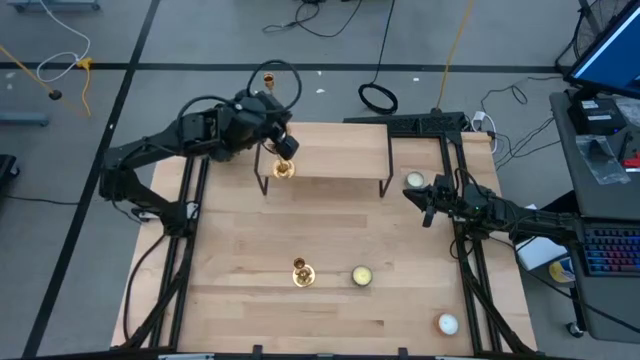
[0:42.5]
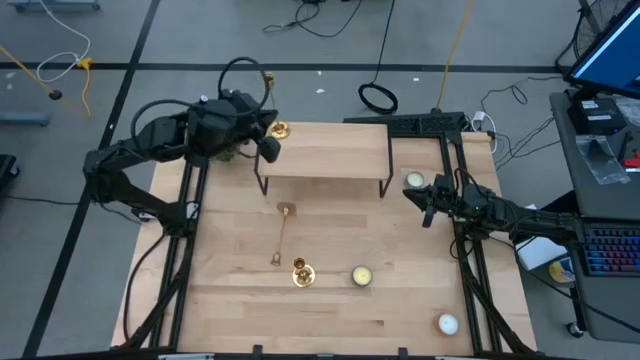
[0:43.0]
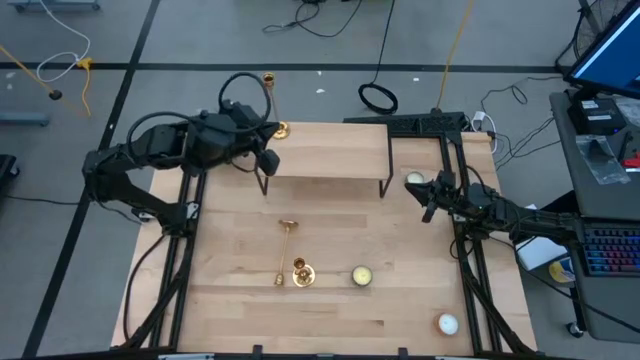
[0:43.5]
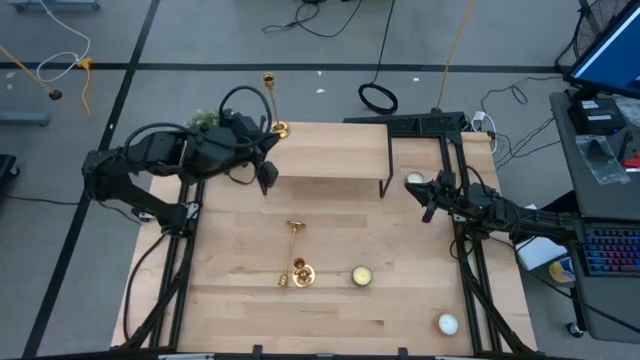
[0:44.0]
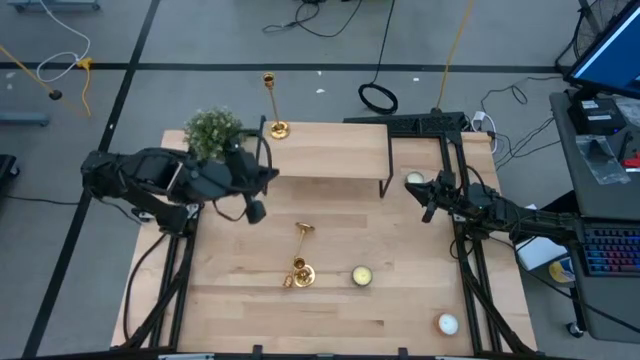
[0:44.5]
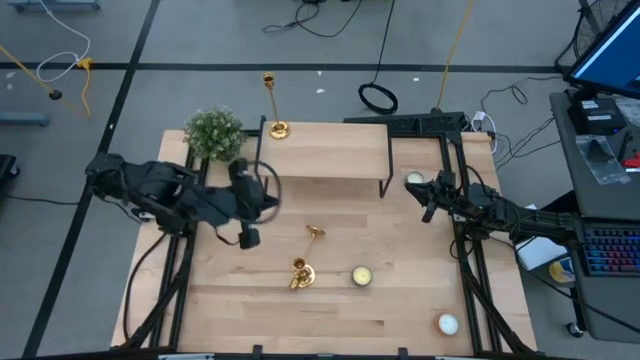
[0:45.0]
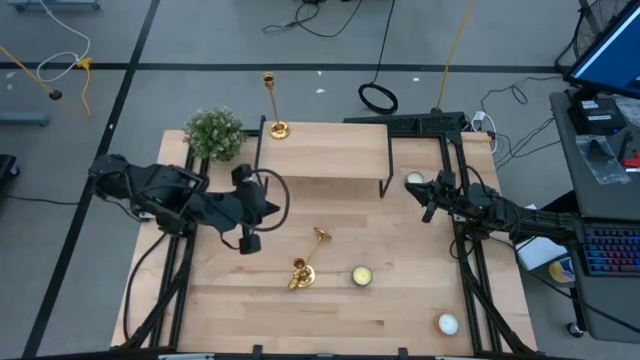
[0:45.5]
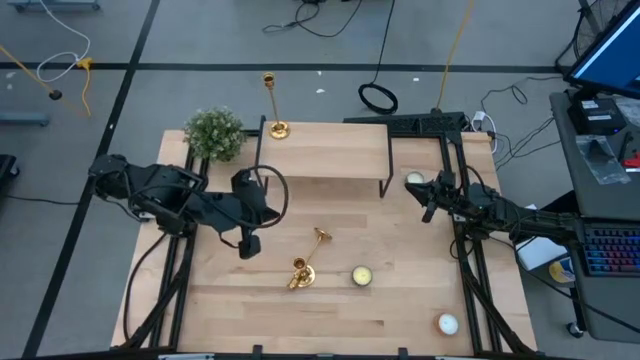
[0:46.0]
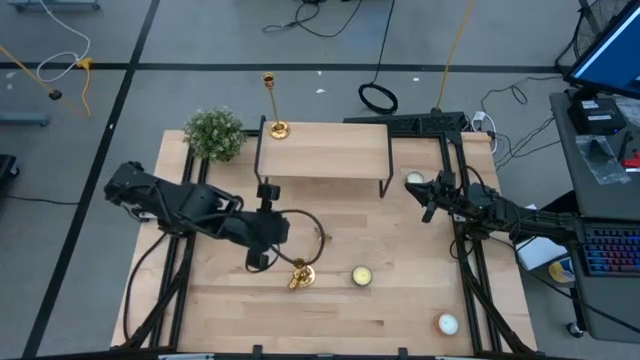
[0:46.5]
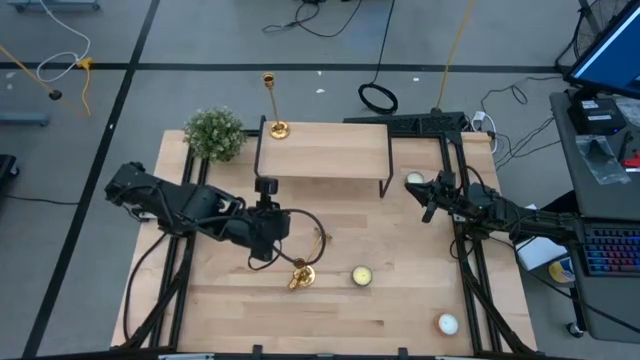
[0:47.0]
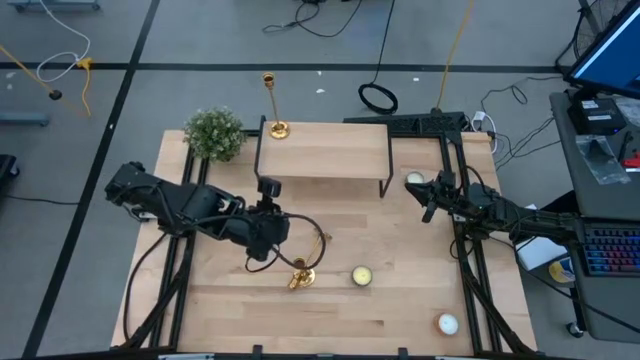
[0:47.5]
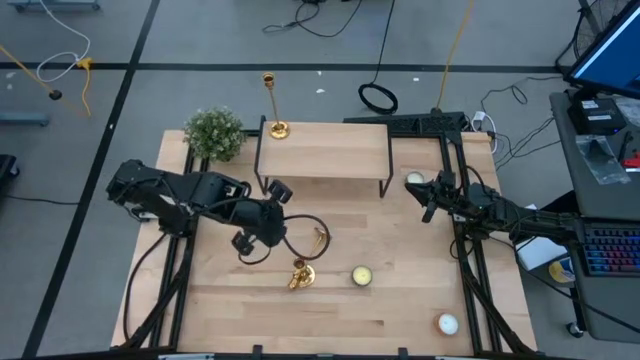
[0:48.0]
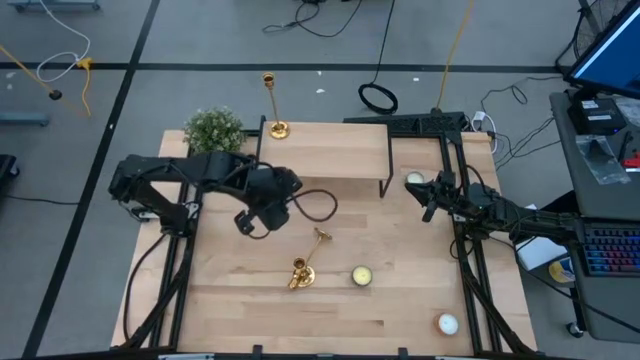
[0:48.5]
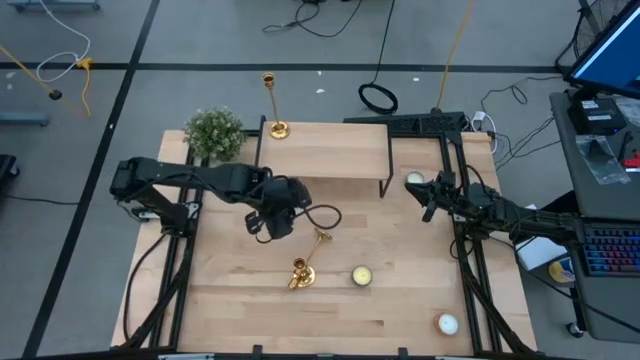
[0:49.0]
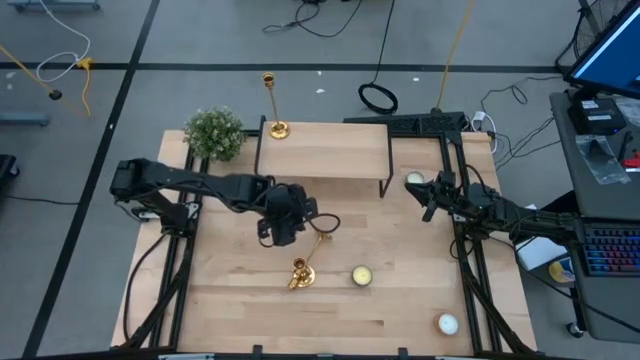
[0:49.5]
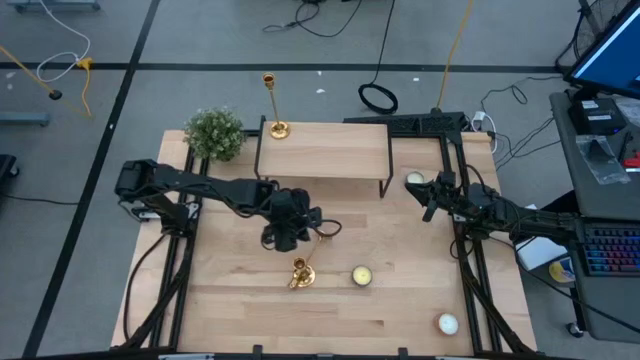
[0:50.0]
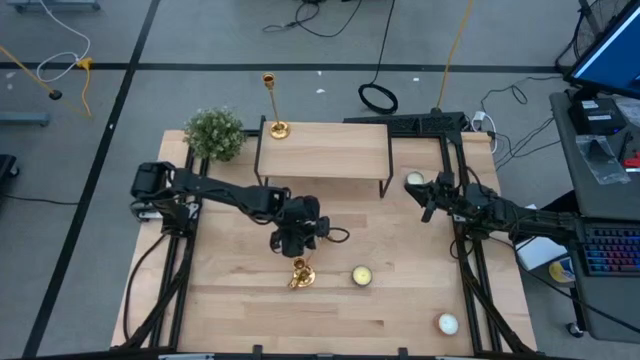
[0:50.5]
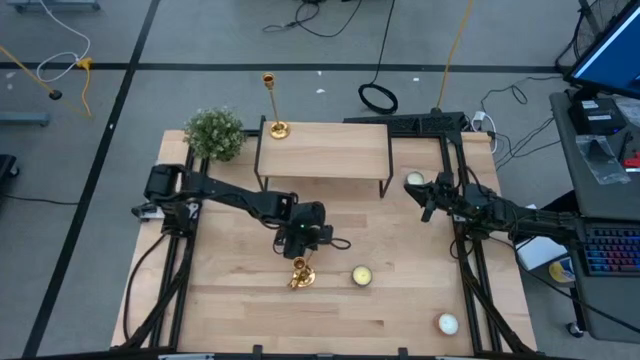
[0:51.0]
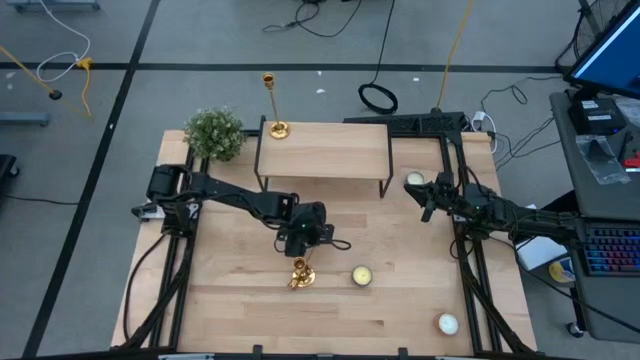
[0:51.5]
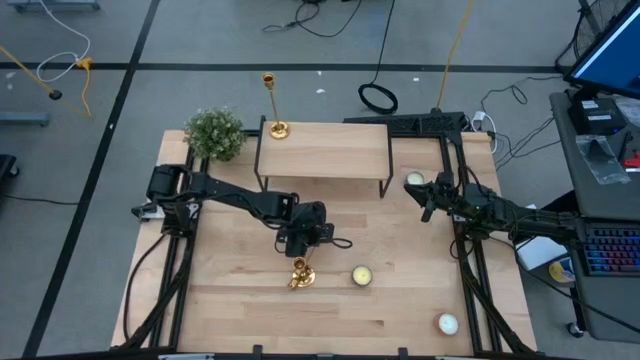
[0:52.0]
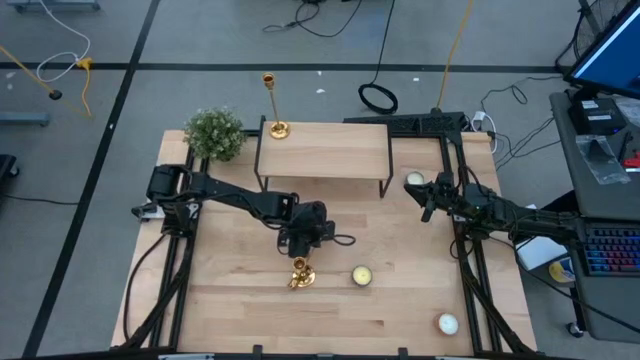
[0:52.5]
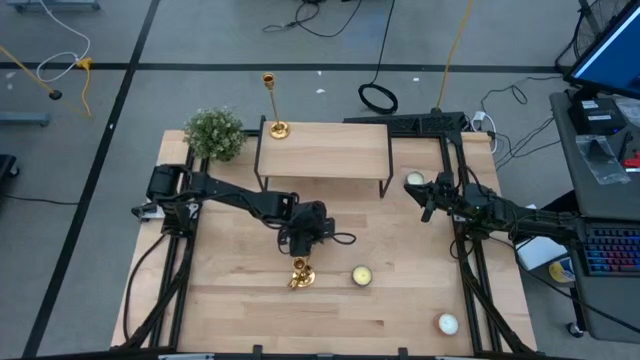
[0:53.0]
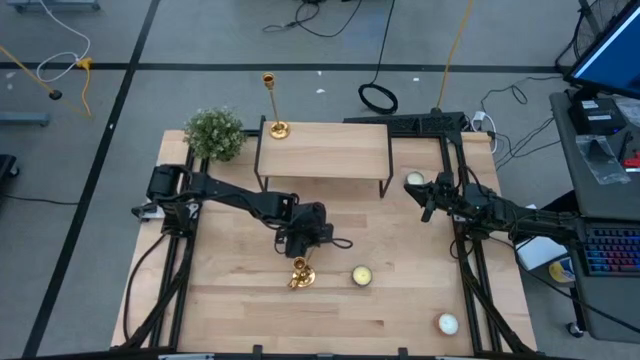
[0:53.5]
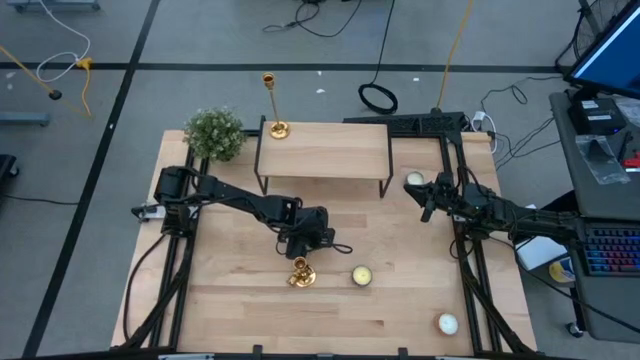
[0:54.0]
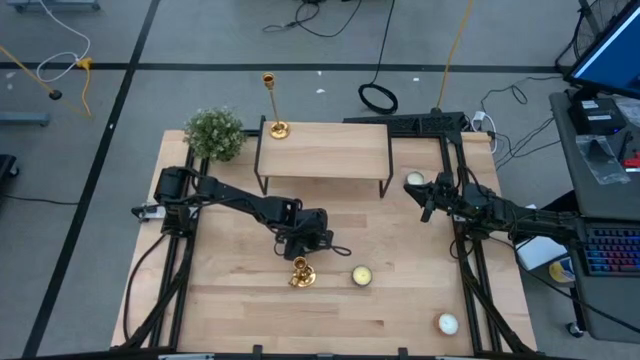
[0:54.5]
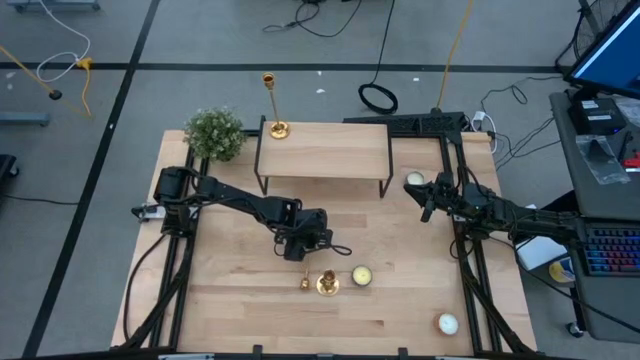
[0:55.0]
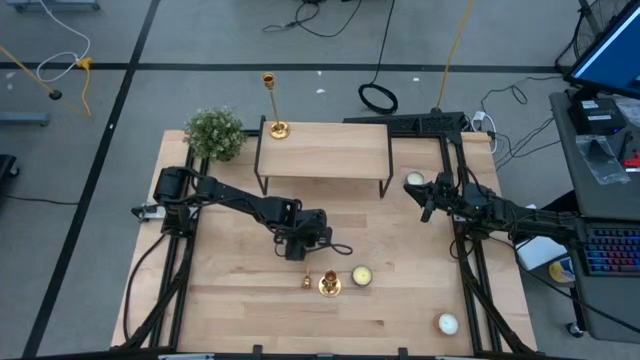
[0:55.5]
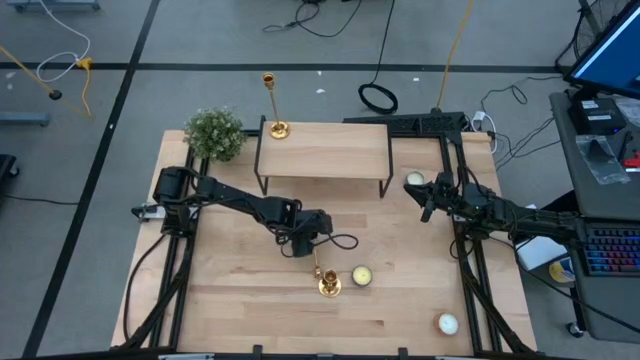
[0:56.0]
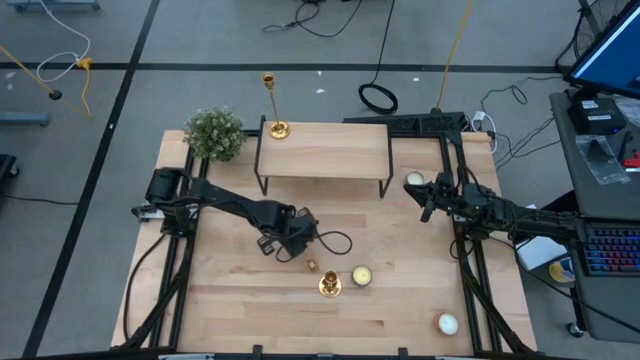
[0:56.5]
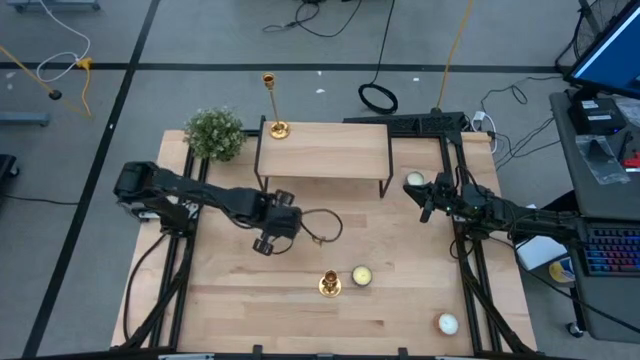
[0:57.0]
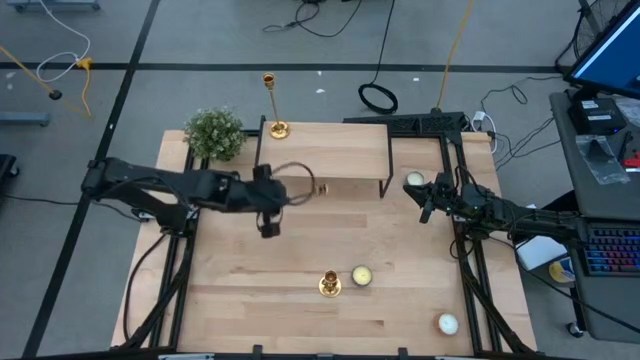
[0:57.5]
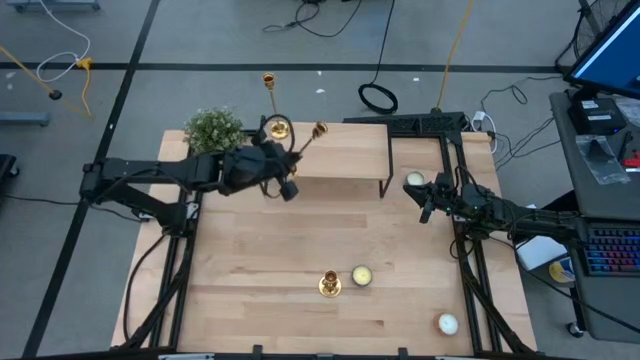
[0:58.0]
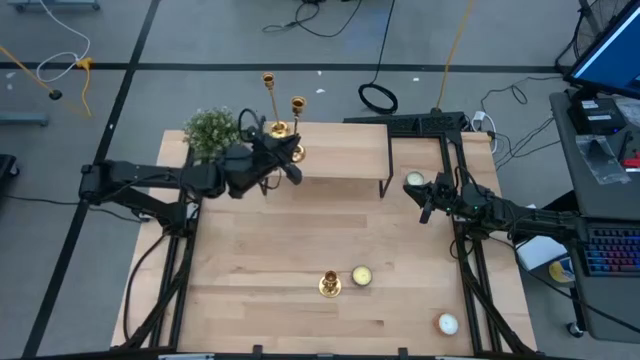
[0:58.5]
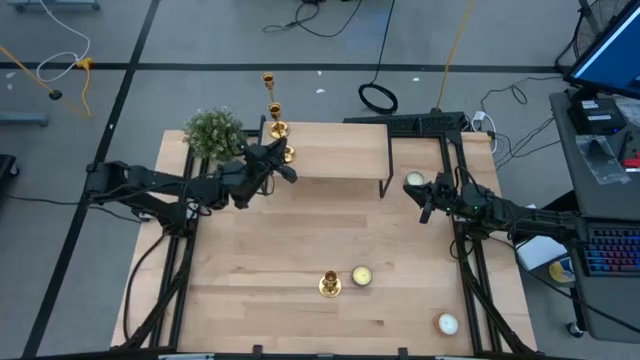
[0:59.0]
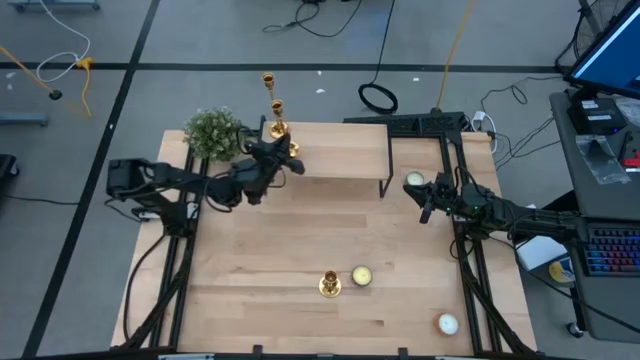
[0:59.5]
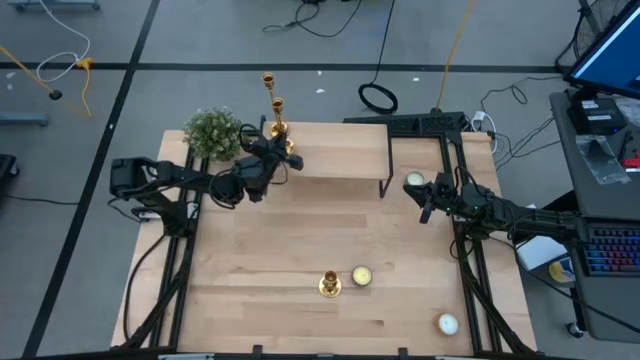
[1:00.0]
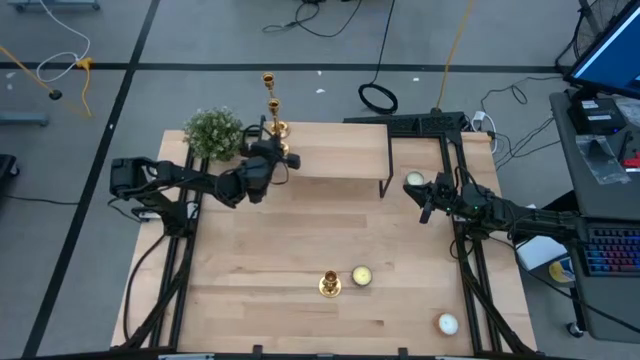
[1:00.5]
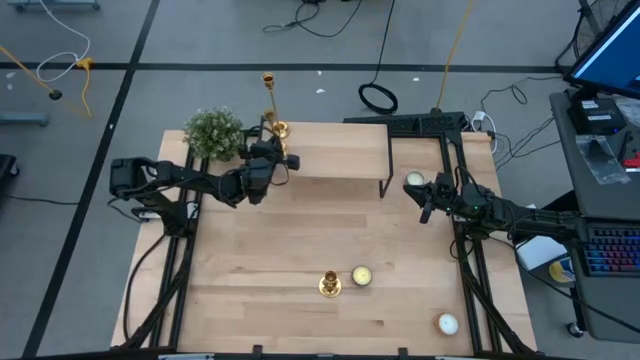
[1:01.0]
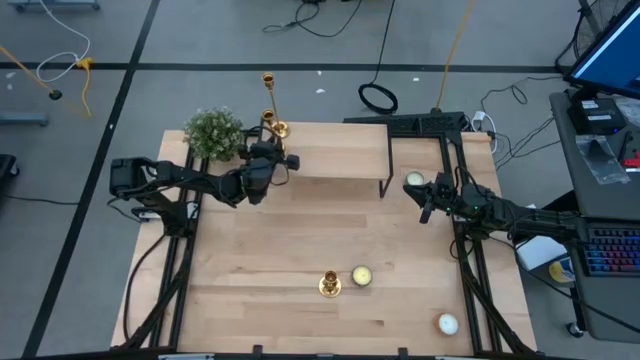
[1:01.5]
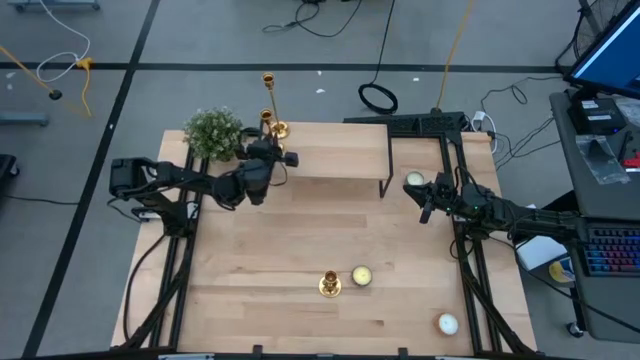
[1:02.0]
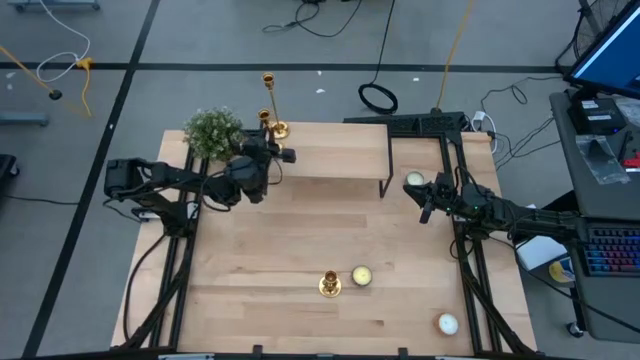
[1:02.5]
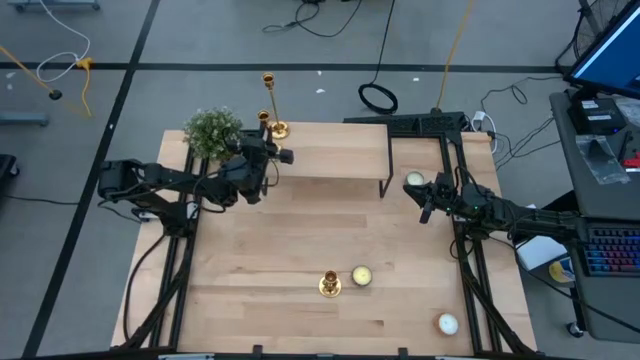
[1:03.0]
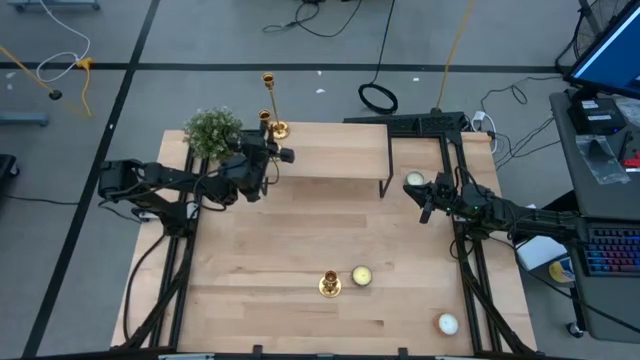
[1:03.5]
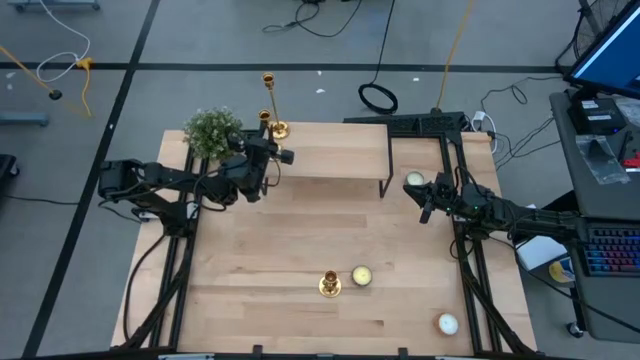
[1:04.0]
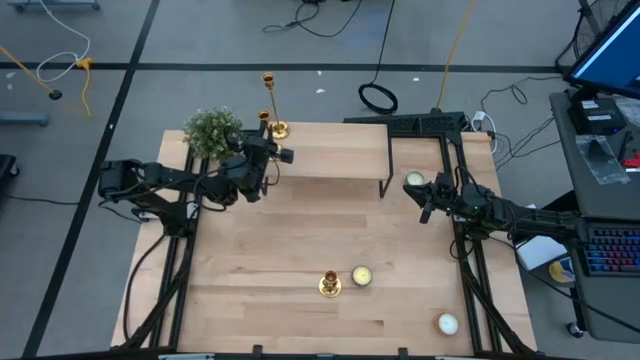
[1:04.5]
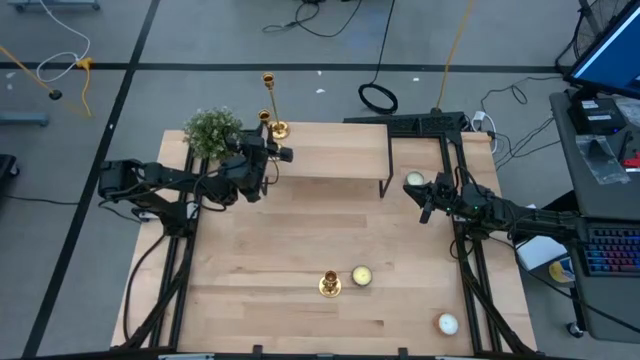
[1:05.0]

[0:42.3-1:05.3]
Task: Pick & Place candle stick holders
Put the bottom gold candle holder on the shelf
